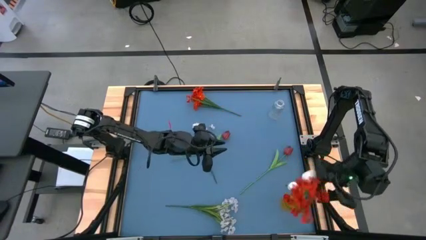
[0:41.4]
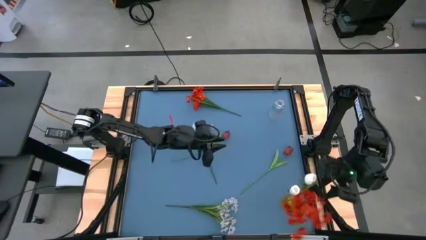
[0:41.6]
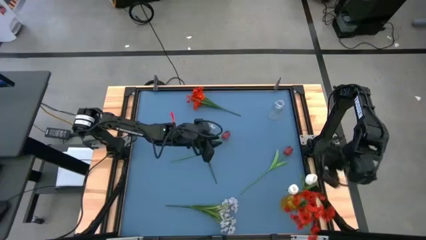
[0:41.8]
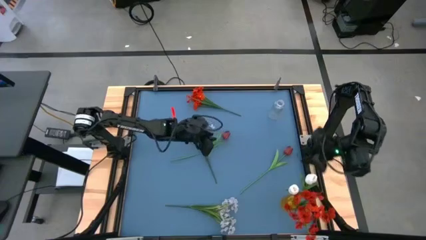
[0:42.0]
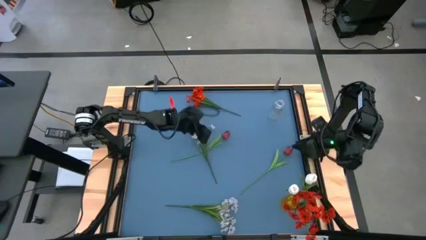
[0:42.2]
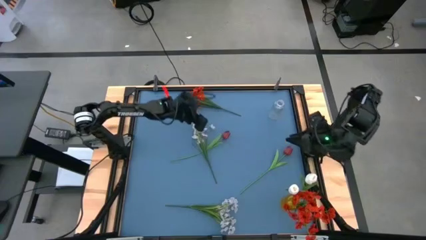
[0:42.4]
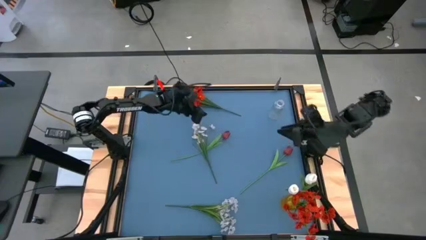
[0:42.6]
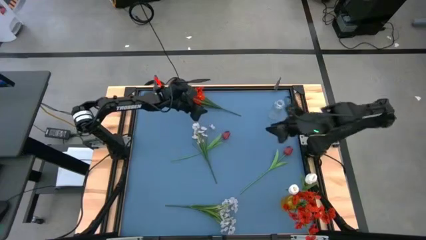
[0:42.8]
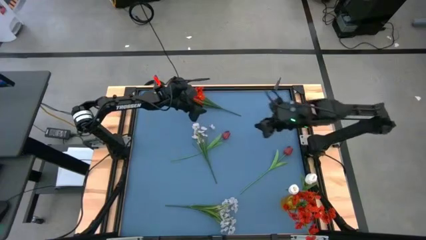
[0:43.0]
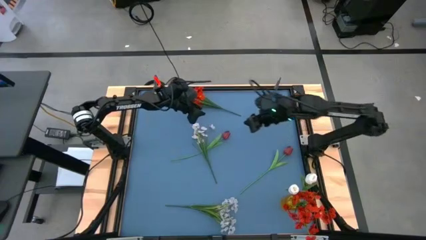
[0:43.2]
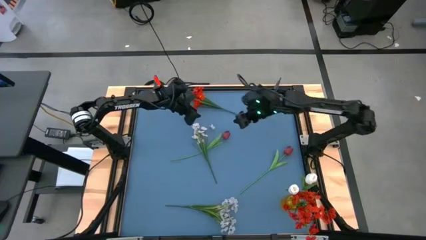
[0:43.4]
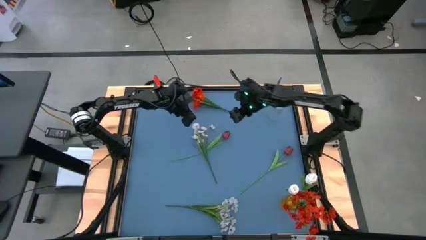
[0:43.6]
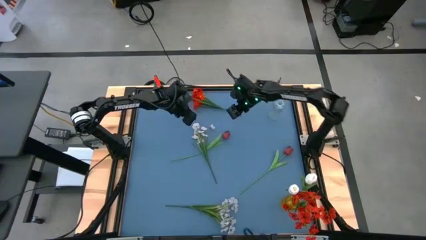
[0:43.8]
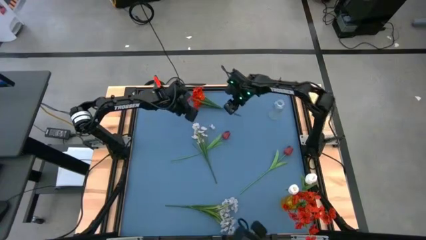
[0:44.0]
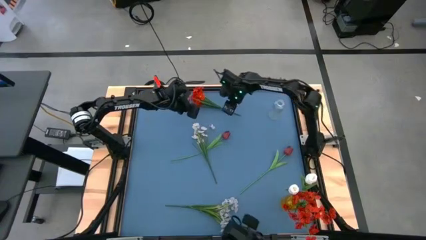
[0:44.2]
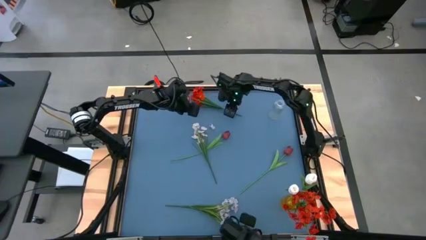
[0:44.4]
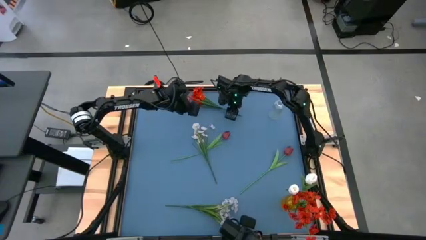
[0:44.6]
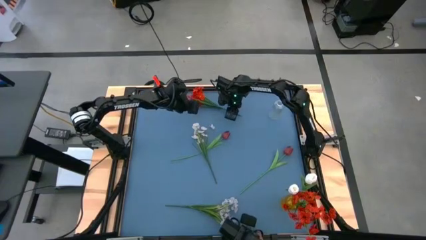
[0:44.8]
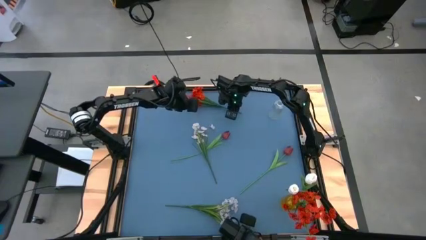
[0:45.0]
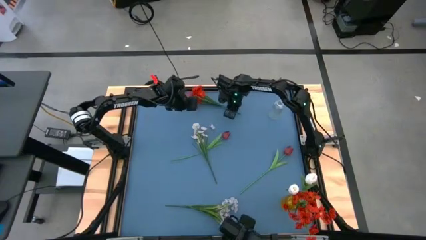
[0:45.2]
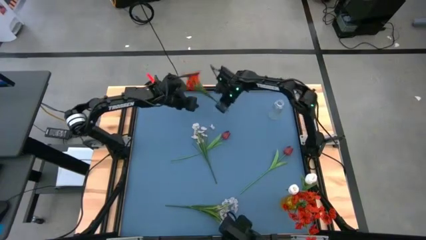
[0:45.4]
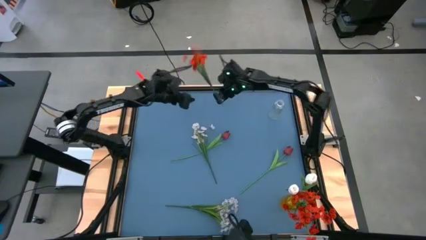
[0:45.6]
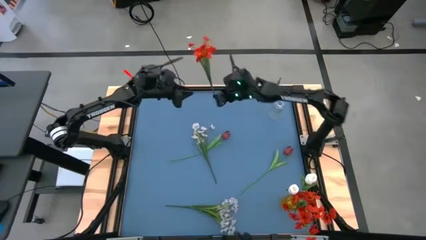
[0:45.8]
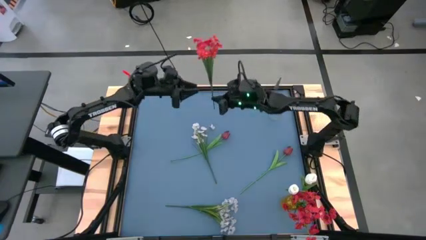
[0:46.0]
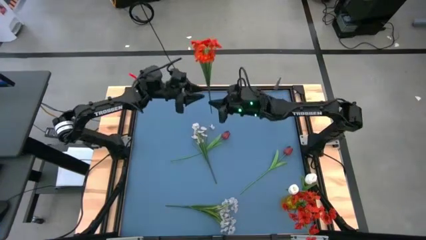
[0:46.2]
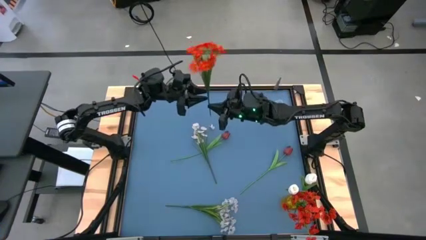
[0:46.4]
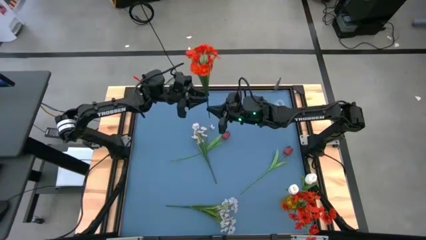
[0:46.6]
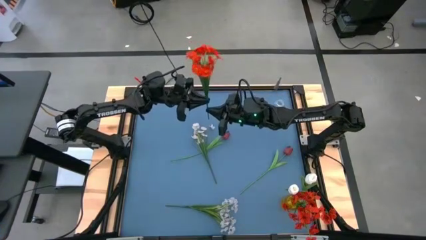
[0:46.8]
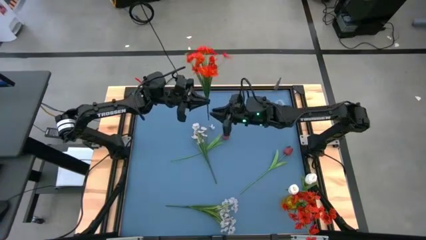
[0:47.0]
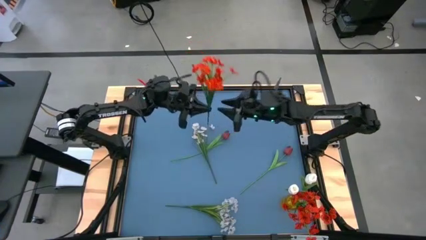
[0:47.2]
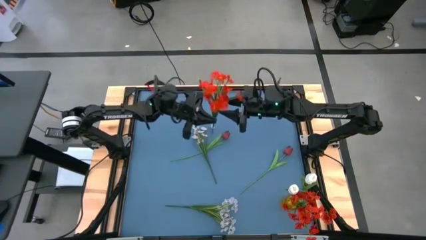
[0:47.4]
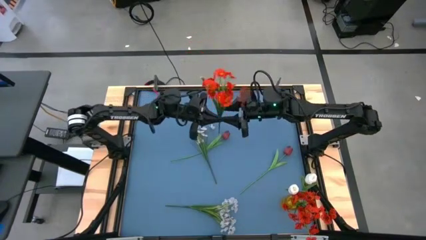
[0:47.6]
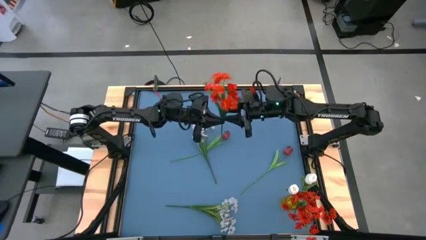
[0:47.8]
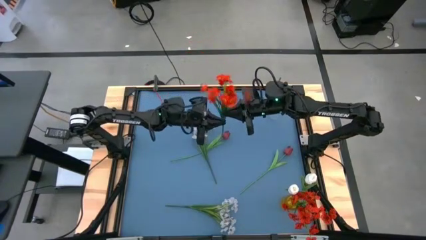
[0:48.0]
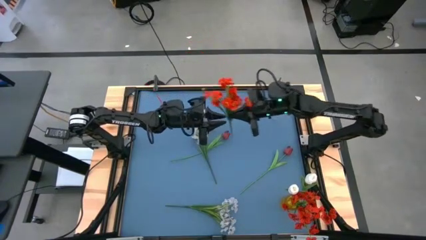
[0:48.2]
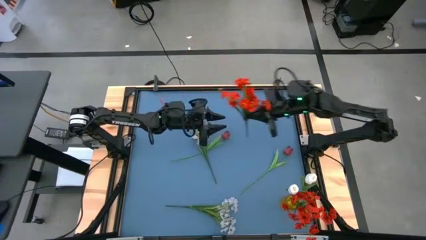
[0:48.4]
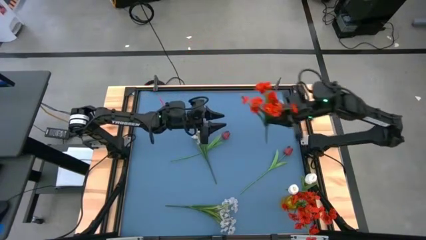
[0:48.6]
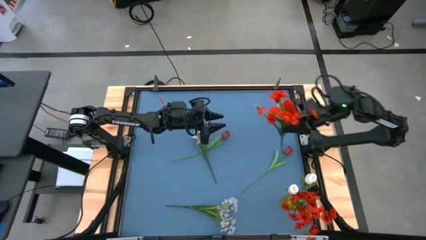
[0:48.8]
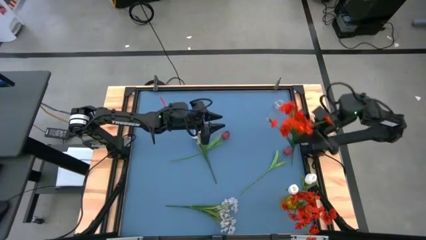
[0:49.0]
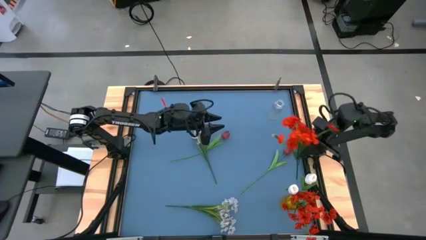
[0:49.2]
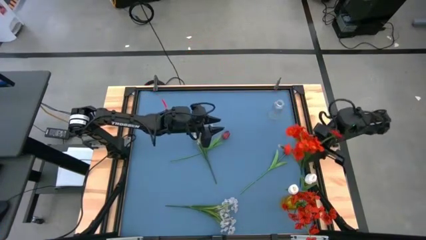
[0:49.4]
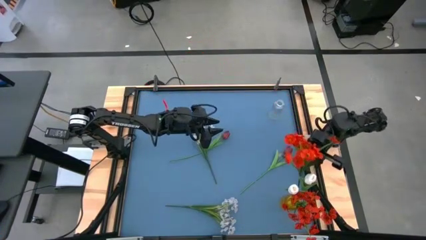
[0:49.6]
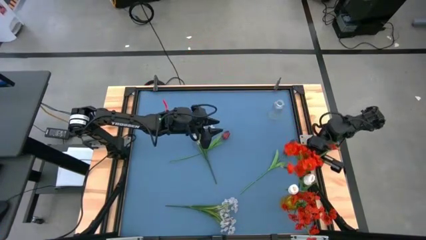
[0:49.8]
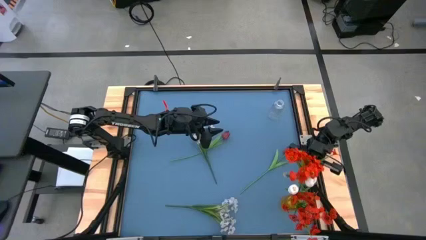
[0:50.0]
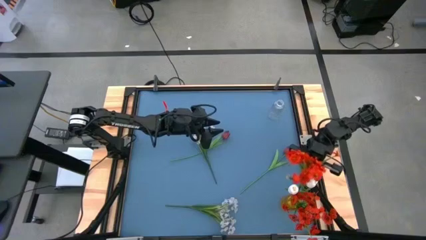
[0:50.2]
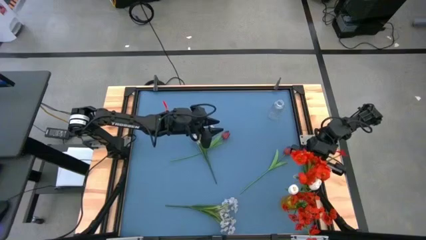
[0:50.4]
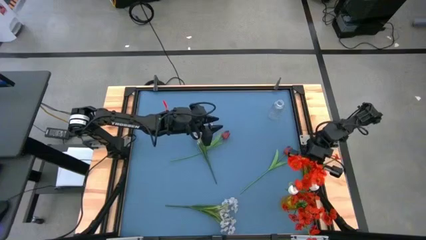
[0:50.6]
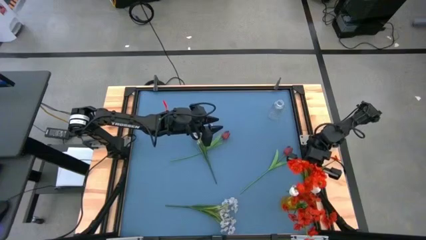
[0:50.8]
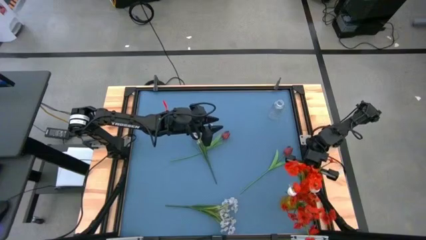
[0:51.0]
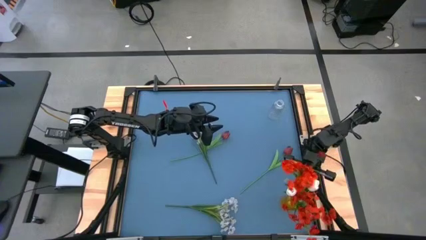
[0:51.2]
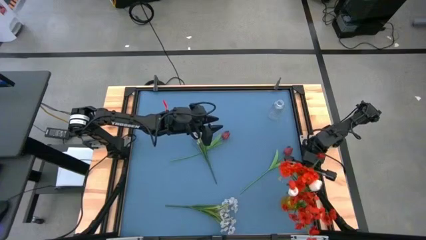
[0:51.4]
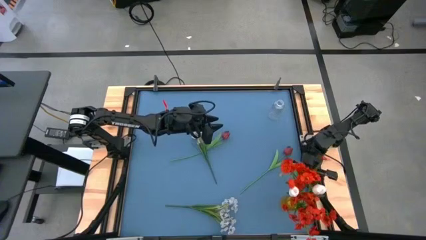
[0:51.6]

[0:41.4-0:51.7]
Task: Sort flowers into vase by color
Put the red flowers into the yellow vase

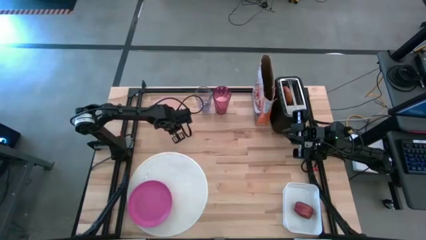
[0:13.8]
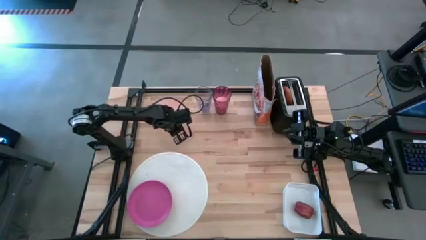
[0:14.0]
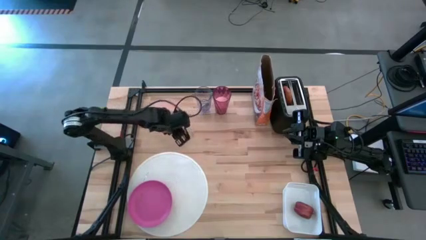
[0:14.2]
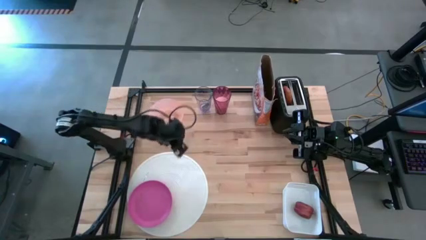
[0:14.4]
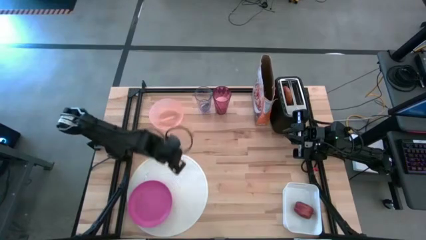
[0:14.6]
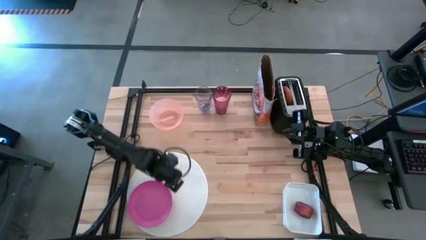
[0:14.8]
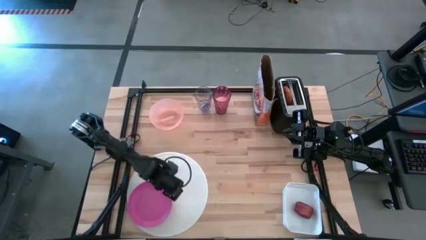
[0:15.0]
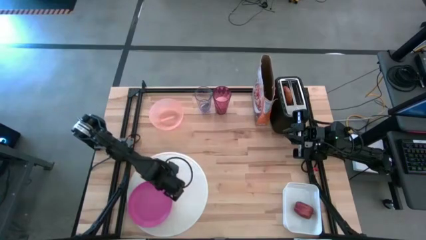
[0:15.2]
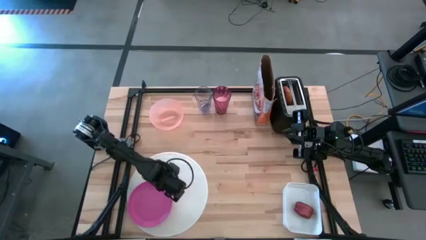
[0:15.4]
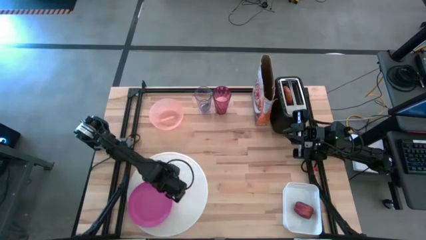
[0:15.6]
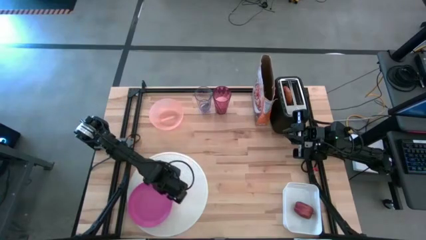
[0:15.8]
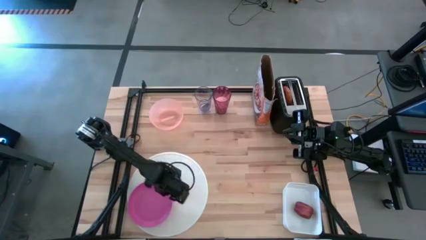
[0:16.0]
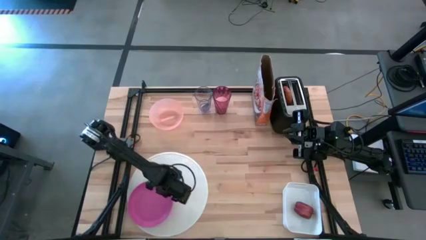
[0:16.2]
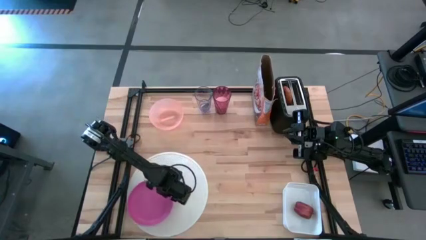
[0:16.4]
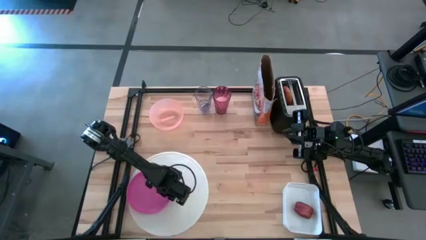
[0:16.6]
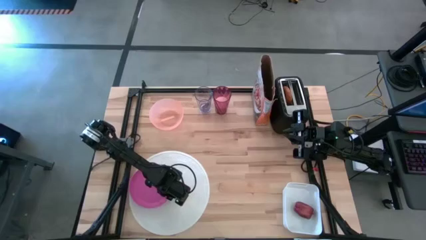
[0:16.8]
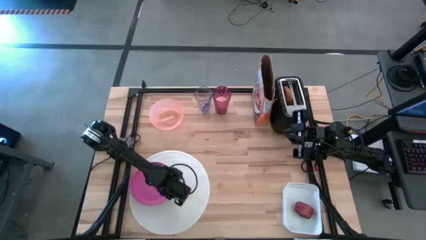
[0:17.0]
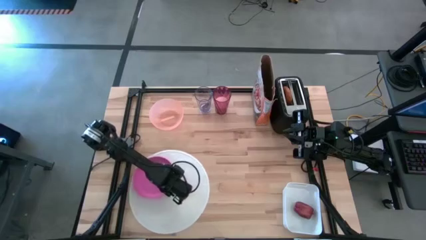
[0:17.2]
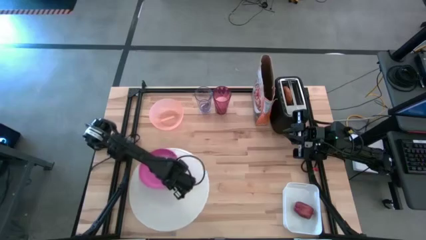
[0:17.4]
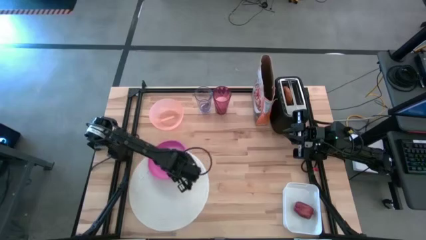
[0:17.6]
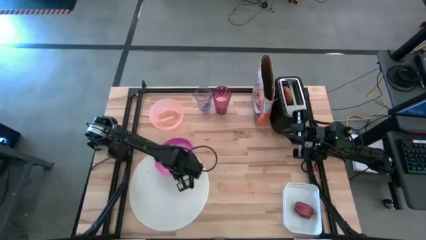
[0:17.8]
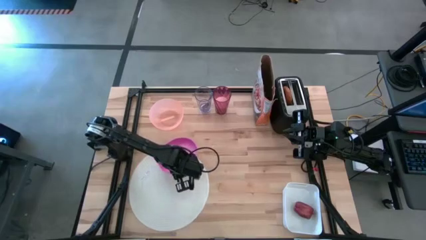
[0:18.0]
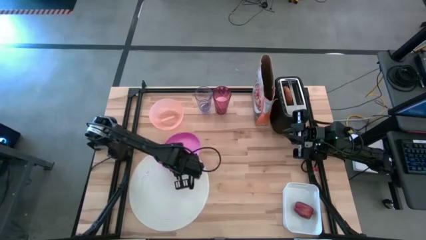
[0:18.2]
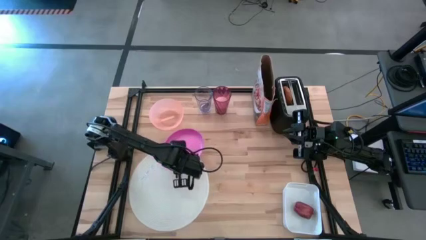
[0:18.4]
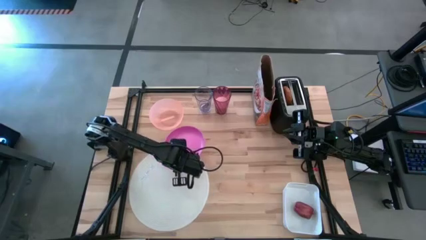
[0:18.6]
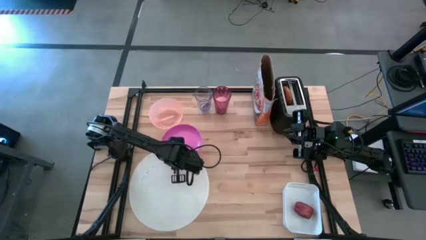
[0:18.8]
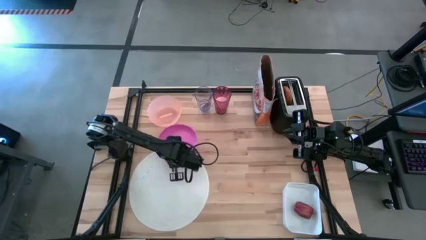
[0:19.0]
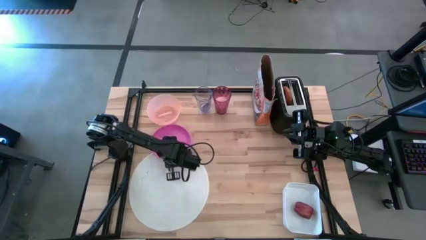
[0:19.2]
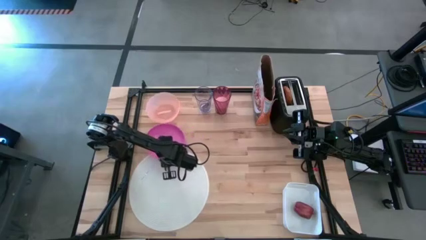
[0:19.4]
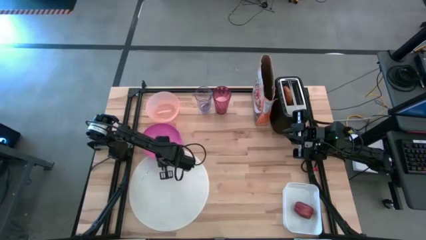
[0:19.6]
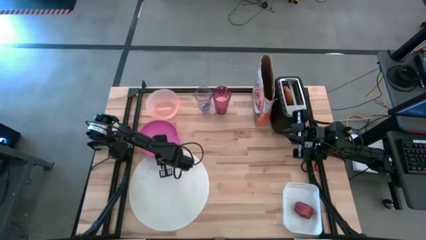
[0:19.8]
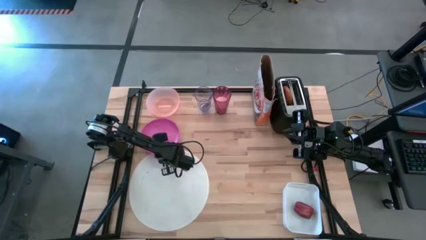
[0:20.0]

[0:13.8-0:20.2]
Task: Arrange a breakfast setting
Remove the pink plate from the white table mat
